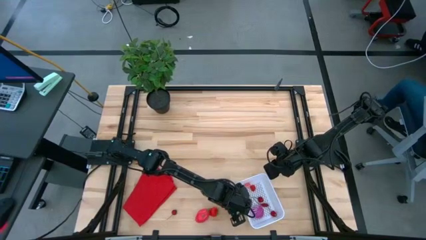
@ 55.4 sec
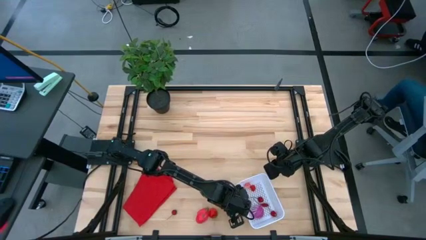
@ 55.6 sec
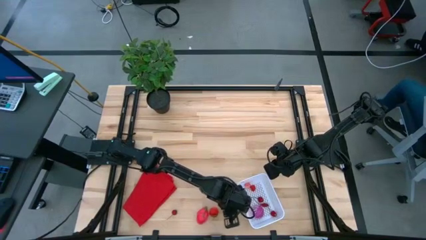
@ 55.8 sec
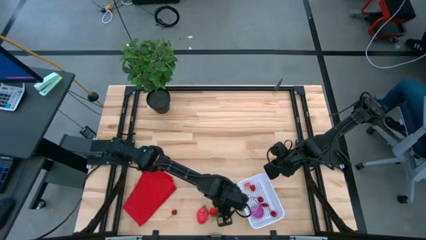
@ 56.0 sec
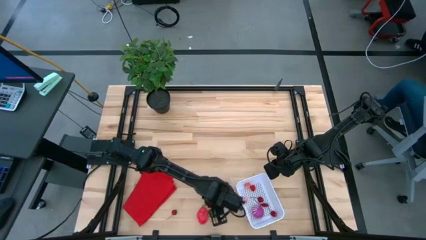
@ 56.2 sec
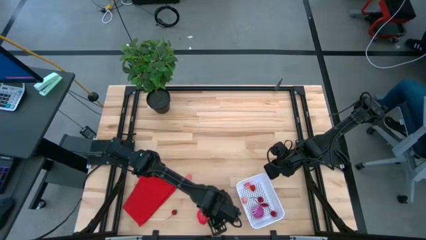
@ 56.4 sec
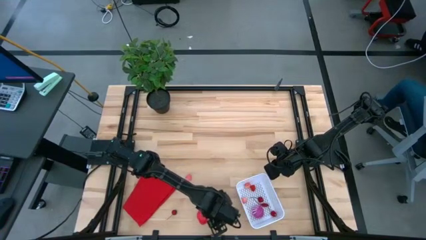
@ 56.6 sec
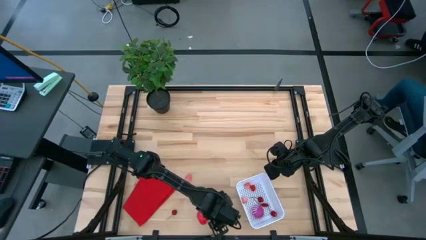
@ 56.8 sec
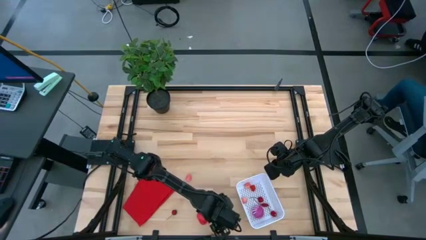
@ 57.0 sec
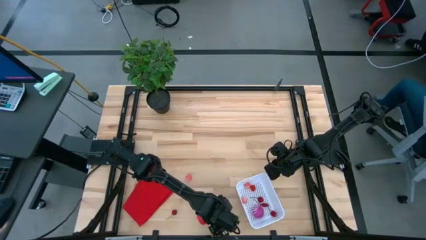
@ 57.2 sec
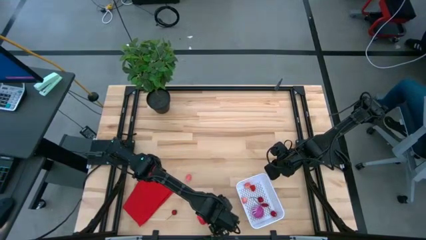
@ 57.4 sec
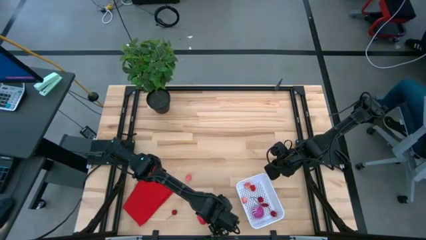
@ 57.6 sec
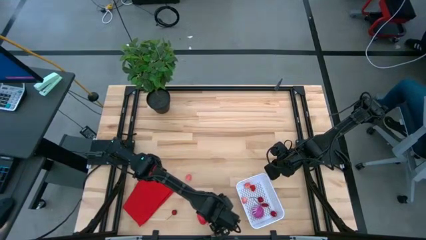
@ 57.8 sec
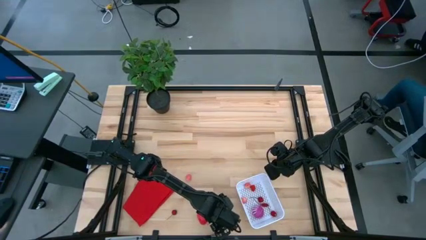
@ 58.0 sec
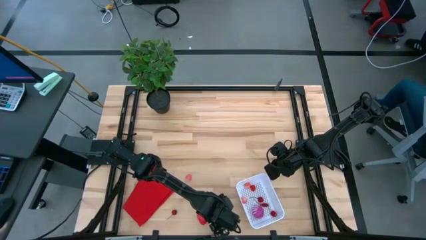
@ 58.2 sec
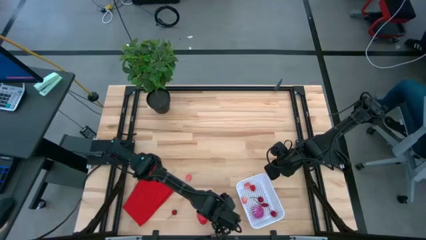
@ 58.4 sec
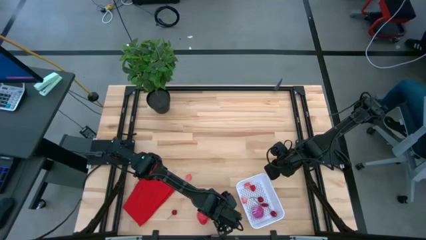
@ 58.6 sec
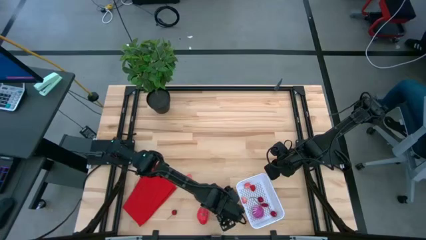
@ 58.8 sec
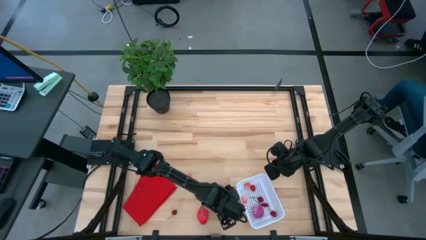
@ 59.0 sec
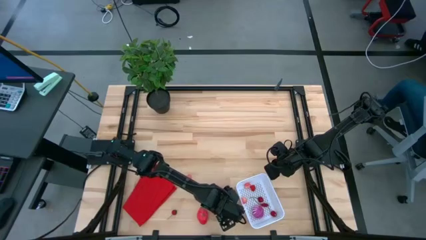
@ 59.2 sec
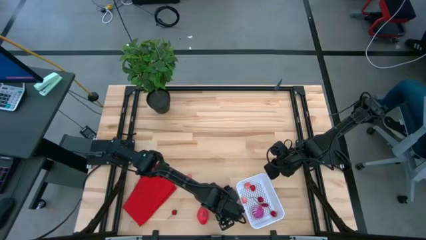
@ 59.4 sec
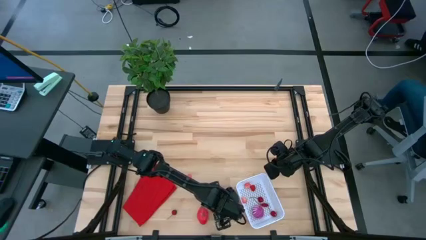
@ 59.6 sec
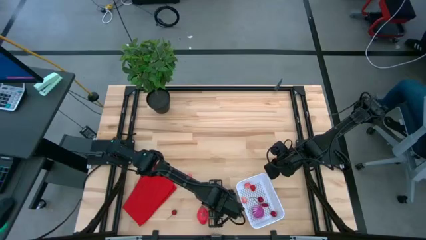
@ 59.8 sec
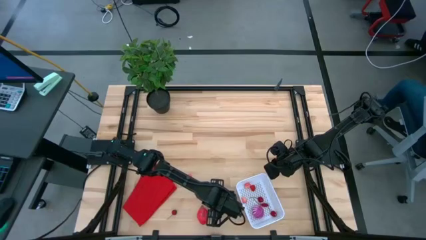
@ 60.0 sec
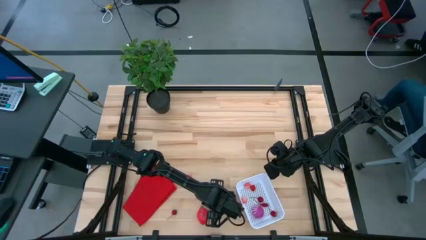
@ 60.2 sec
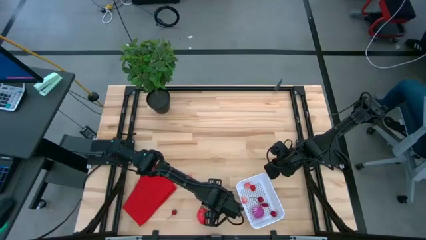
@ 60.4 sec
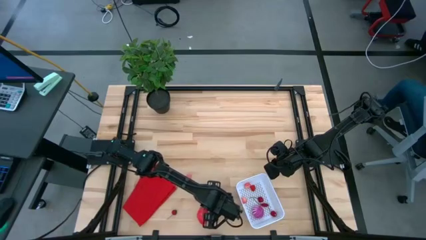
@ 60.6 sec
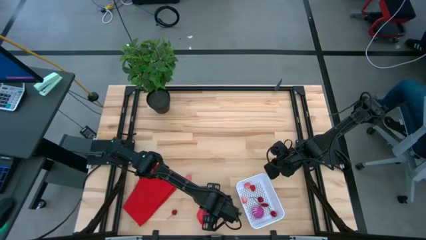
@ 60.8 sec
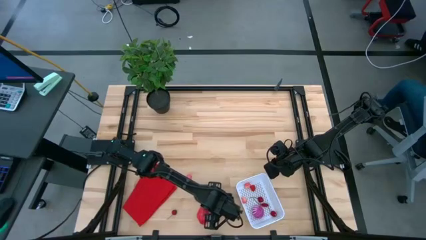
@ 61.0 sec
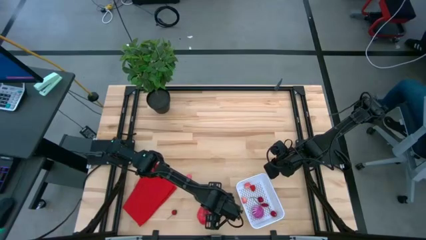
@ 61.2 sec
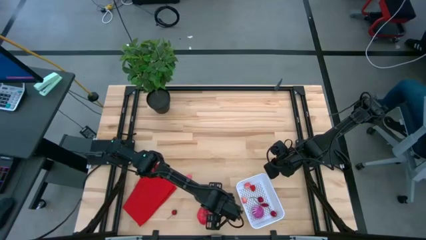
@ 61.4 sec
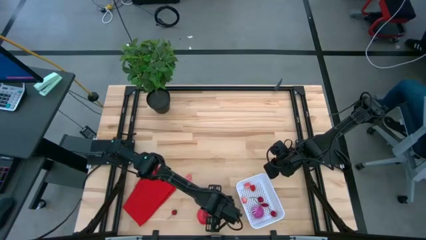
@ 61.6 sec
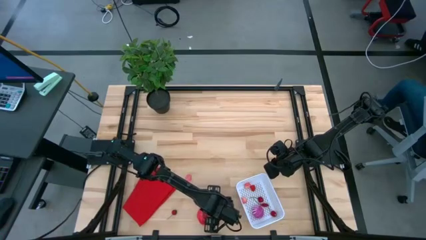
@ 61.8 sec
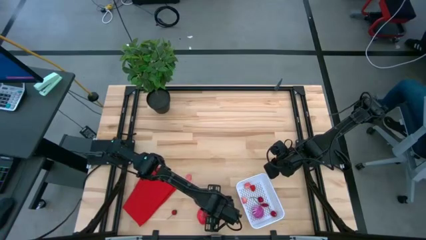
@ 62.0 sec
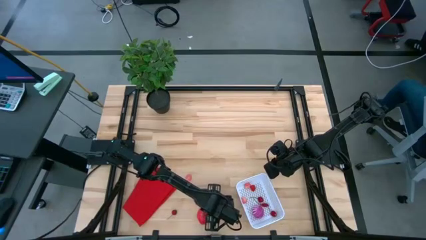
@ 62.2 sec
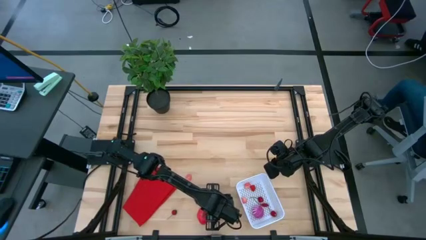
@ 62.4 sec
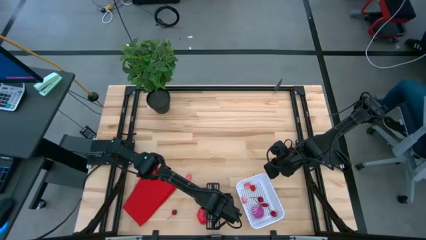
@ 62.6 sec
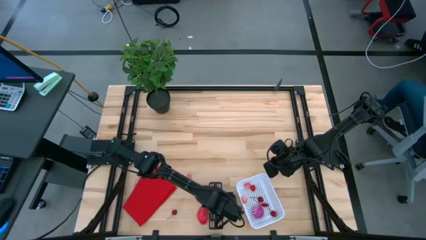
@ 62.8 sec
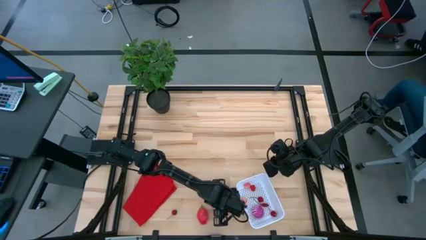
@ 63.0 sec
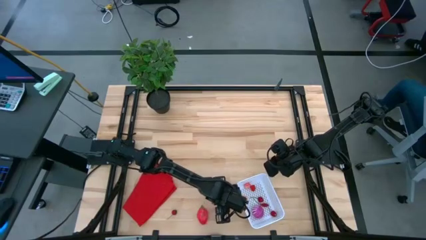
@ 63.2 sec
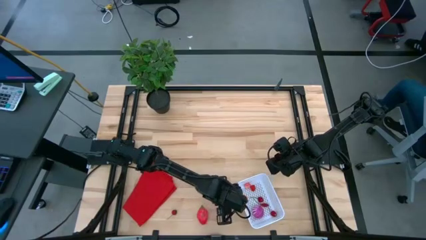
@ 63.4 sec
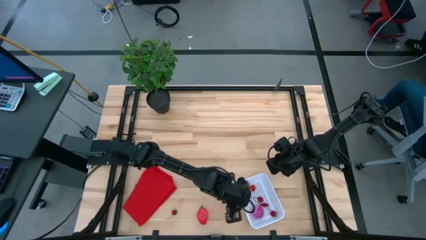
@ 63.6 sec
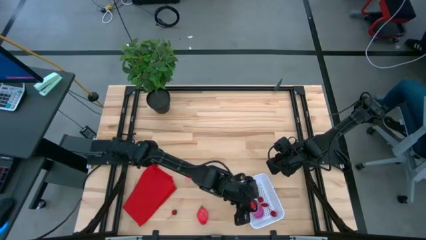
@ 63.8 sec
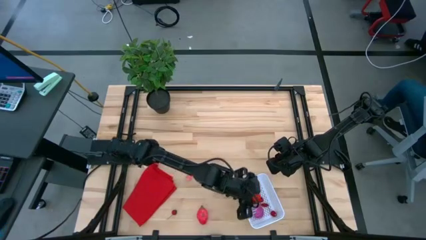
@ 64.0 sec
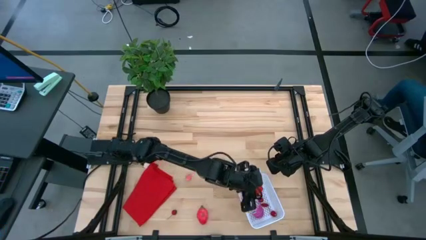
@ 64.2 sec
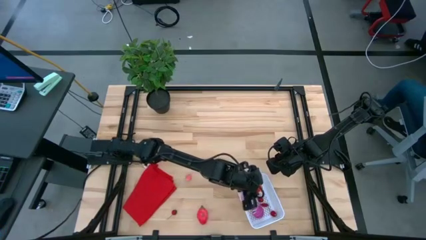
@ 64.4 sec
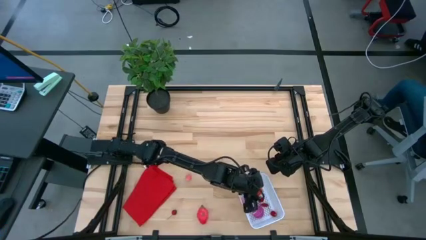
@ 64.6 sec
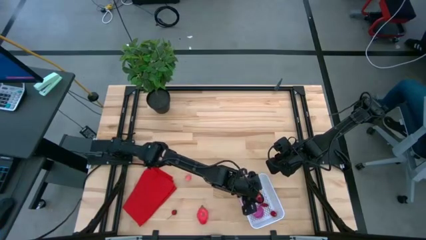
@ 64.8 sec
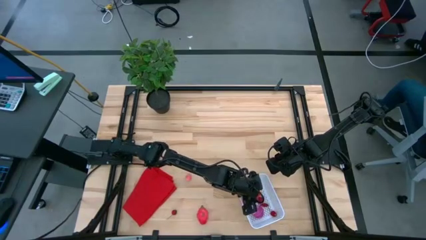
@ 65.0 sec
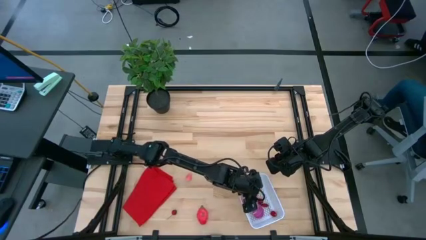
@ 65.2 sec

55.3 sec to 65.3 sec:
Task: Pick and placing Produce into tupperware
Put the red strawberry into the white basket

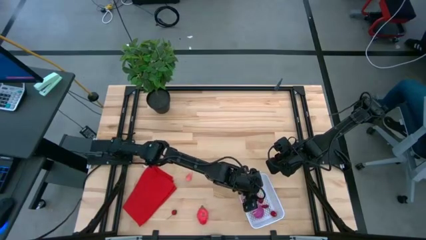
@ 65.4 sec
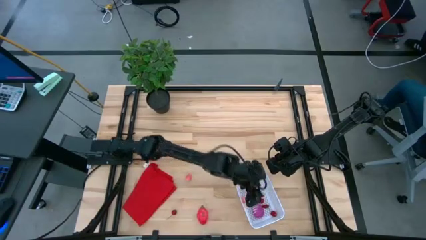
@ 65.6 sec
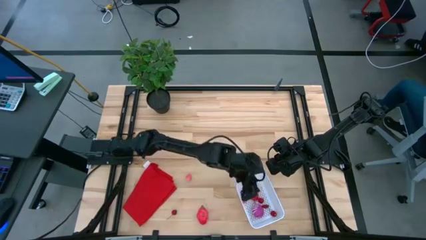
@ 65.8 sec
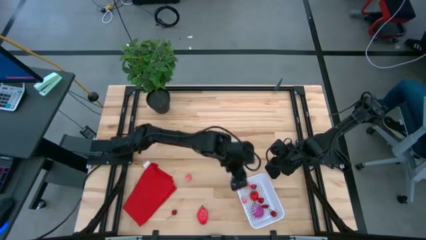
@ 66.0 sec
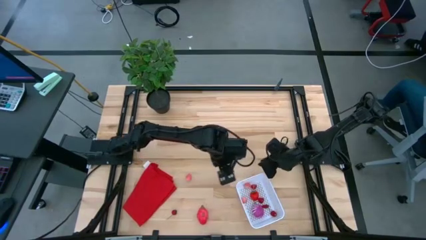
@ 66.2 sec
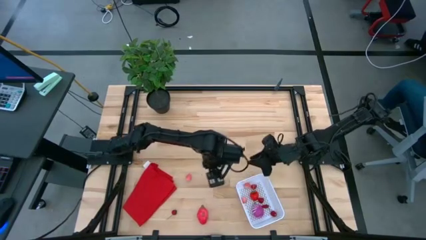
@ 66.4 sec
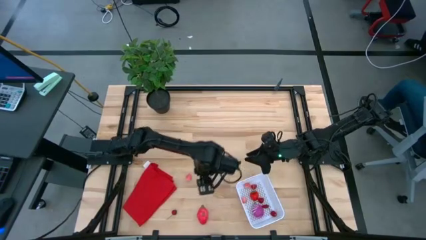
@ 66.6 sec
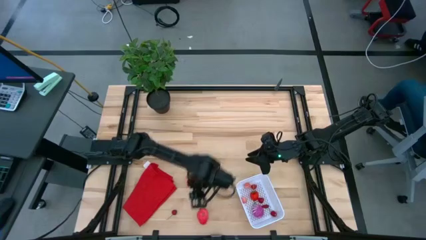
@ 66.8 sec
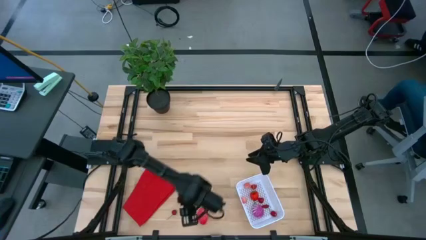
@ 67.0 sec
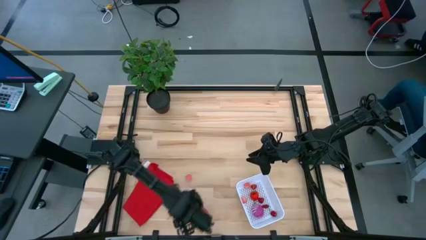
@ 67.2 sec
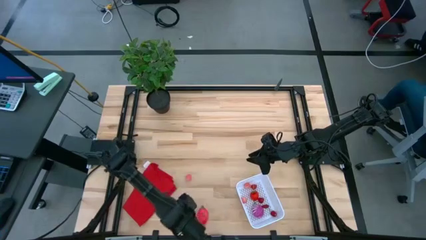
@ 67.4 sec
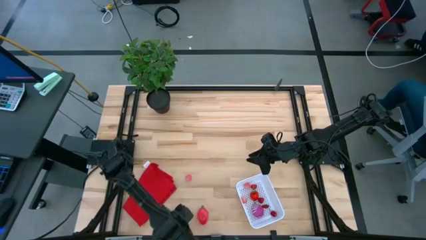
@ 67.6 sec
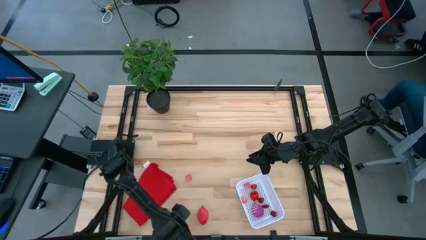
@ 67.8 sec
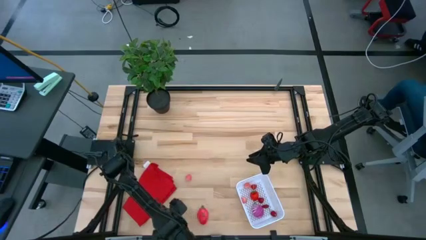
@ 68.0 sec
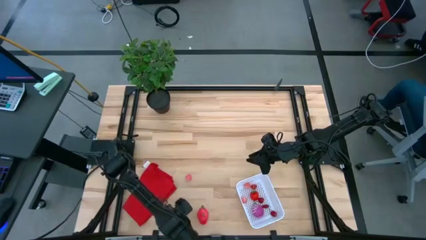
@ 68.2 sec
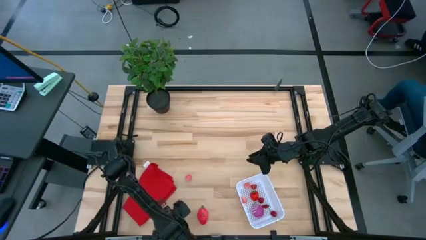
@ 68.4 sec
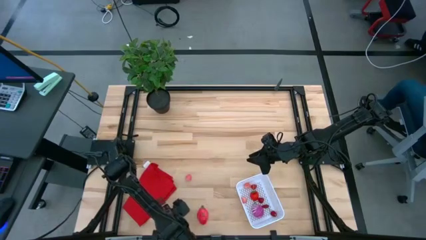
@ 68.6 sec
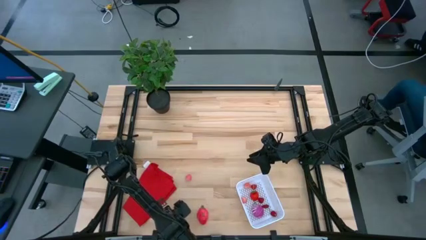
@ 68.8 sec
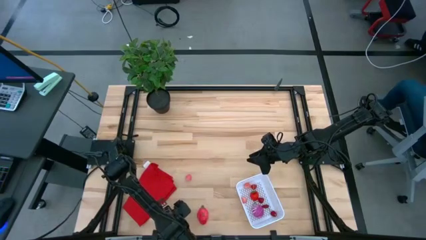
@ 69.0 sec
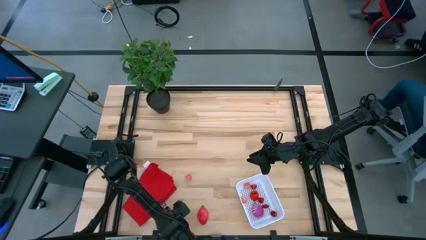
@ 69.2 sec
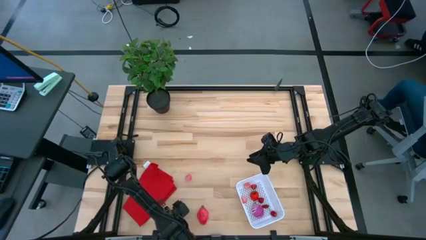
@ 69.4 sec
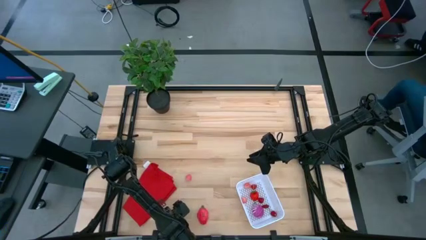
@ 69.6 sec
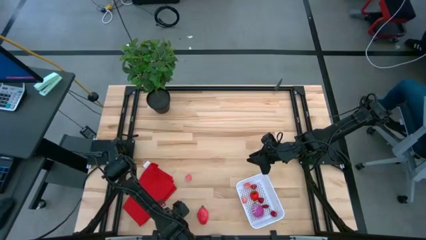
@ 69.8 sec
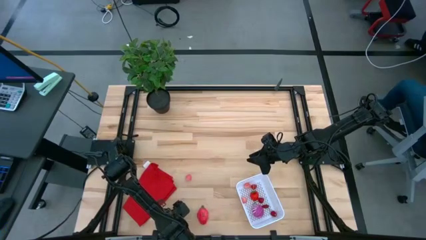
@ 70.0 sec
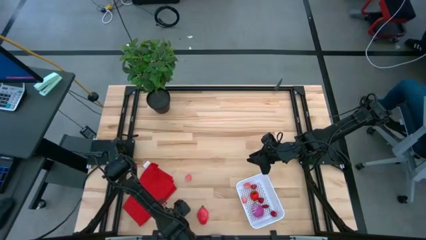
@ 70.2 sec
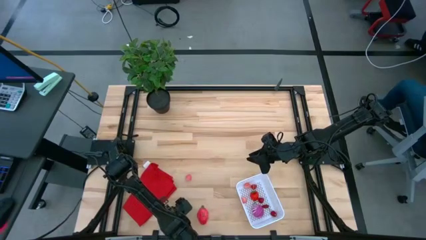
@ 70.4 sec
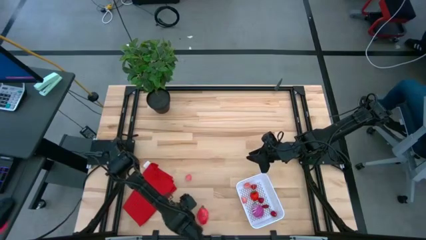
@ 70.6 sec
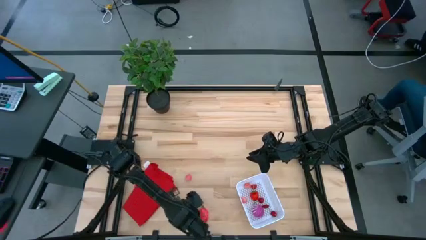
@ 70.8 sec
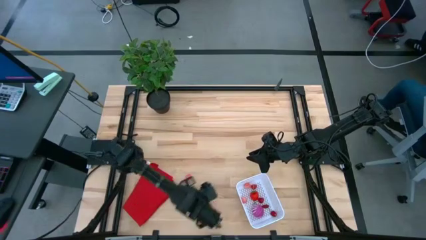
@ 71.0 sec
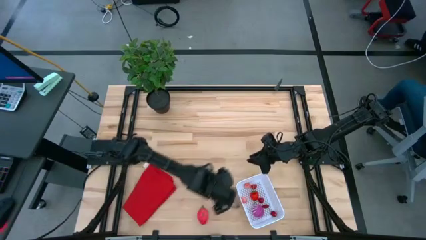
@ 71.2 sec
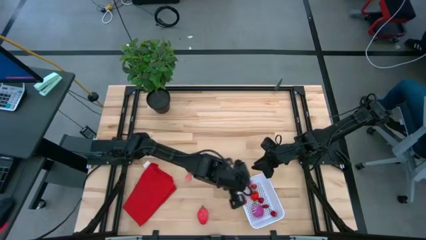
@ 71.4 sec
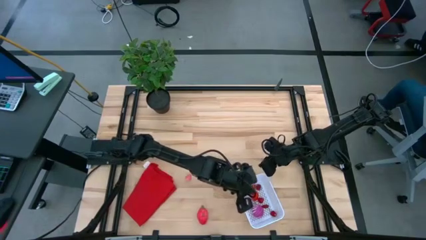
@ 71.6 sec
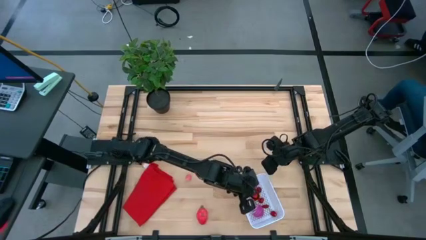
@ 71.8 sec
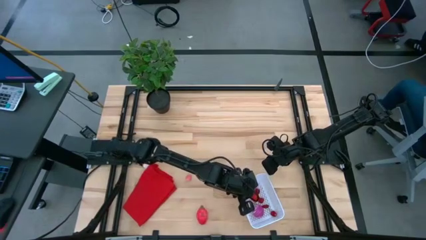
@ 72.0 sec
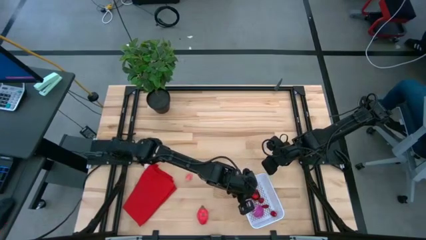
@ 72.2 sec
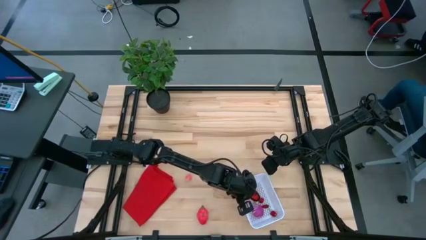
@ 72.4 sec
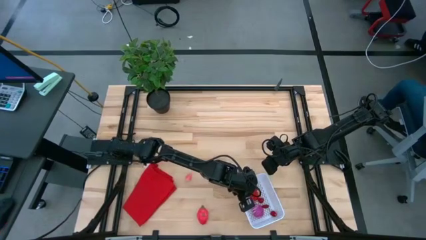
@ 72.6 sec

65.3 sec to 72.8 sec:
Put the red cherry into the white basket
